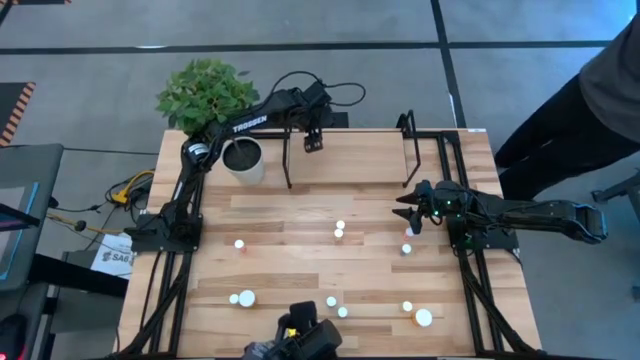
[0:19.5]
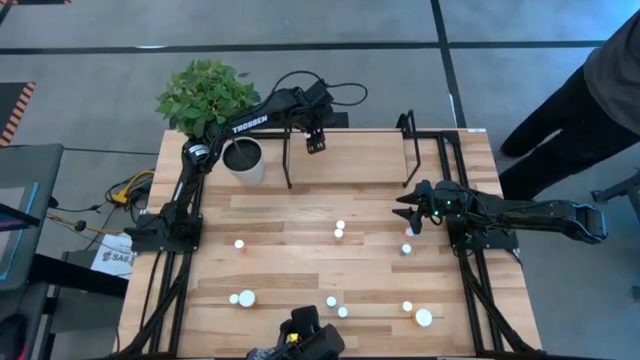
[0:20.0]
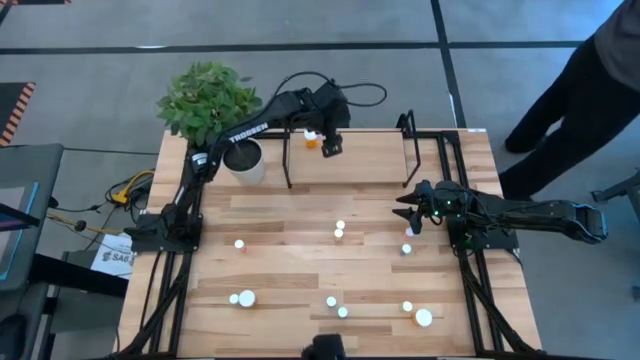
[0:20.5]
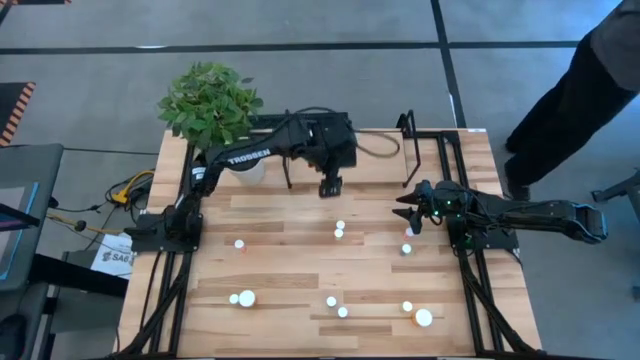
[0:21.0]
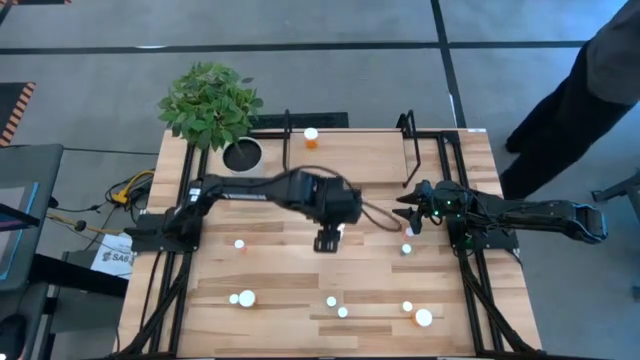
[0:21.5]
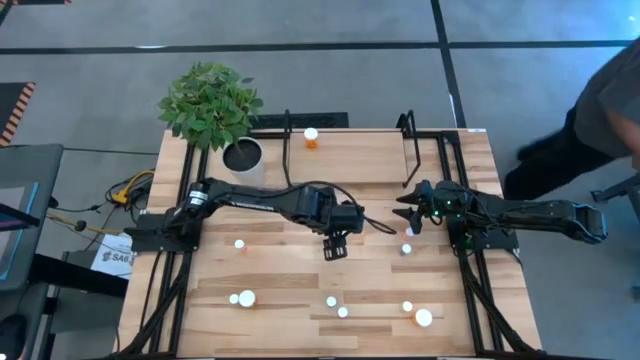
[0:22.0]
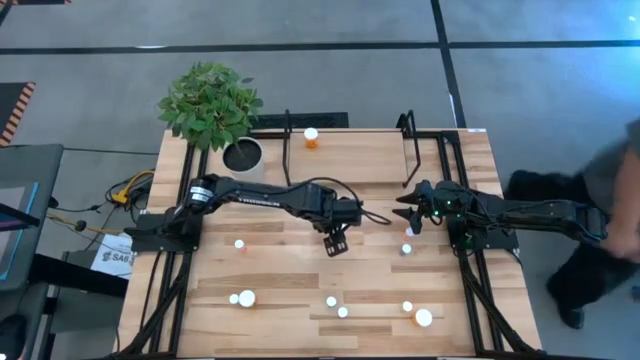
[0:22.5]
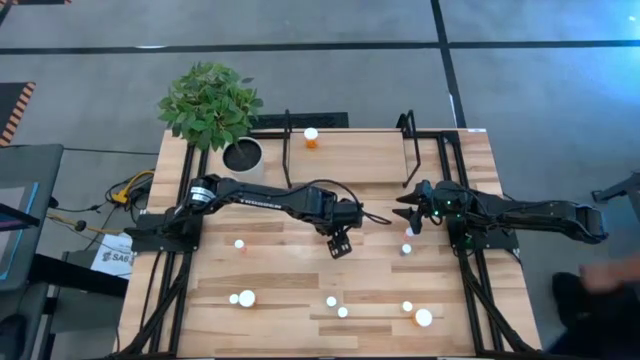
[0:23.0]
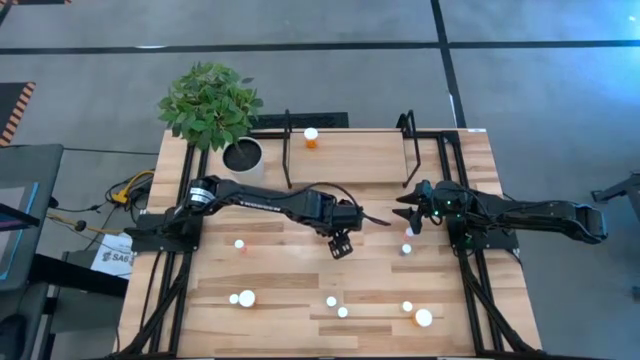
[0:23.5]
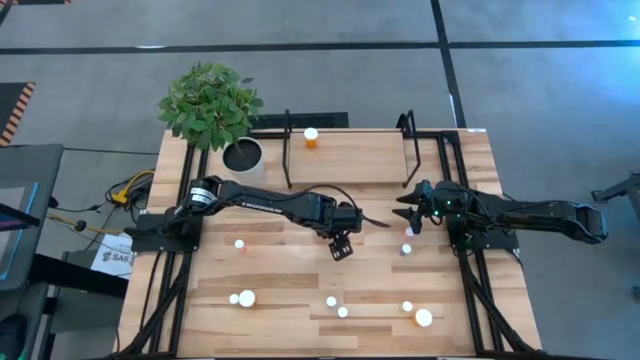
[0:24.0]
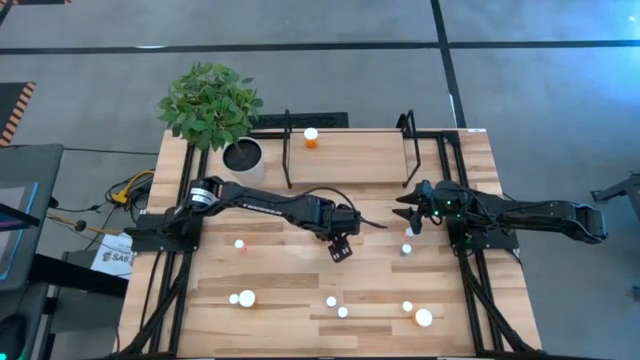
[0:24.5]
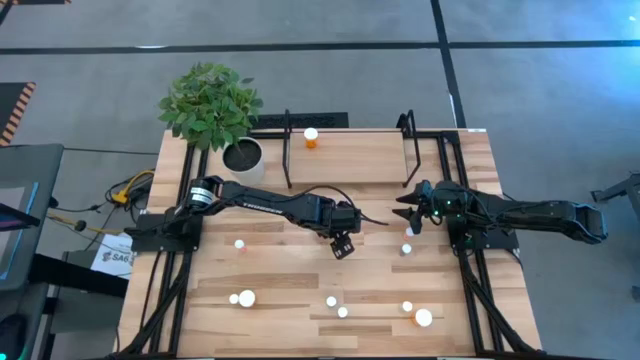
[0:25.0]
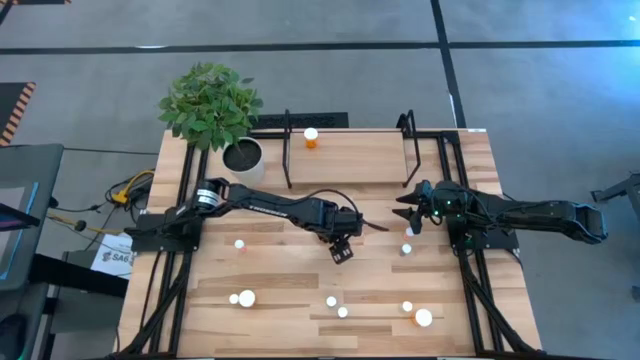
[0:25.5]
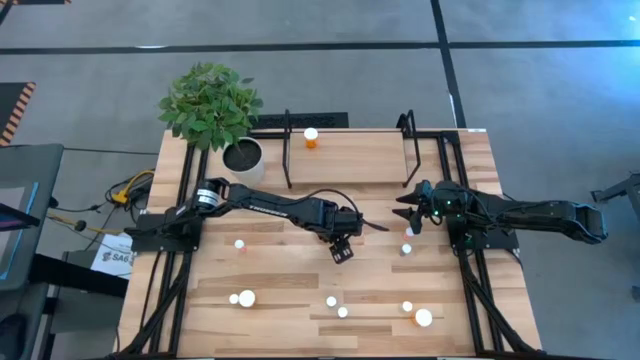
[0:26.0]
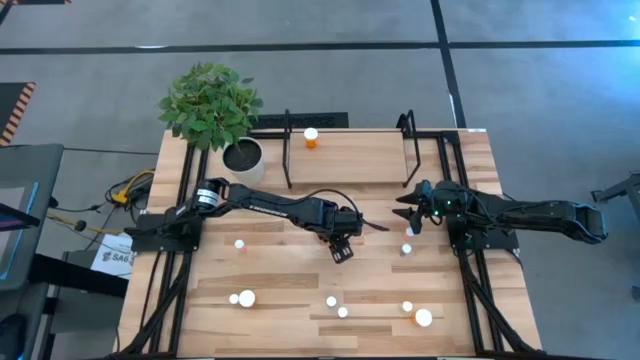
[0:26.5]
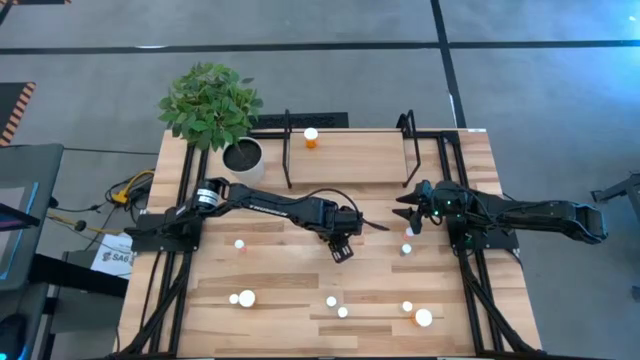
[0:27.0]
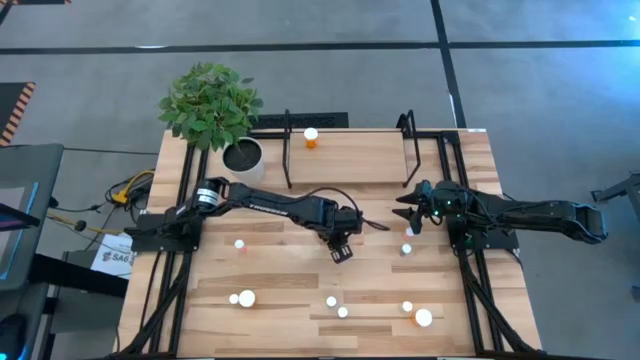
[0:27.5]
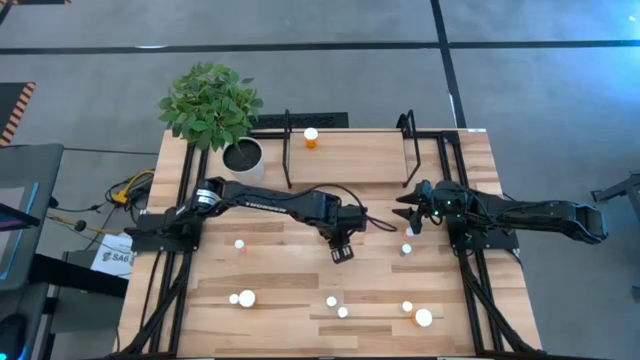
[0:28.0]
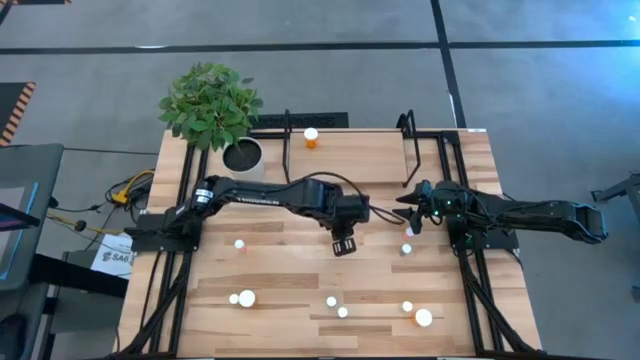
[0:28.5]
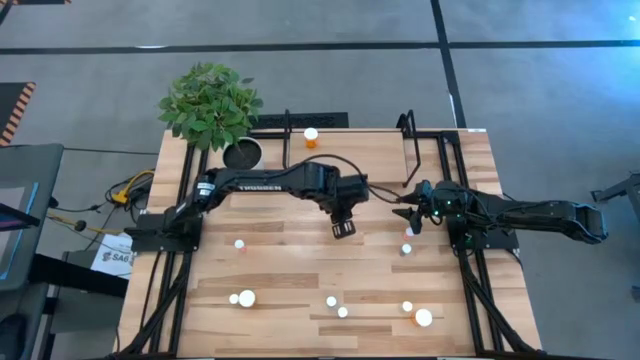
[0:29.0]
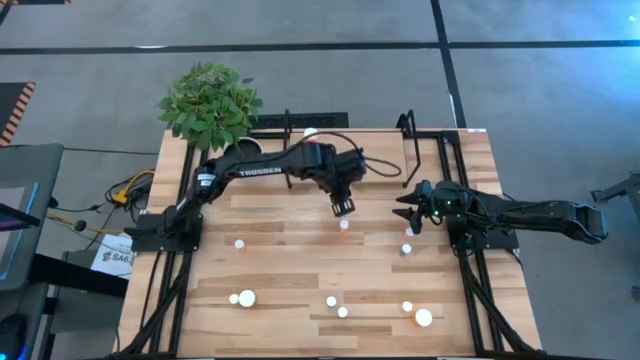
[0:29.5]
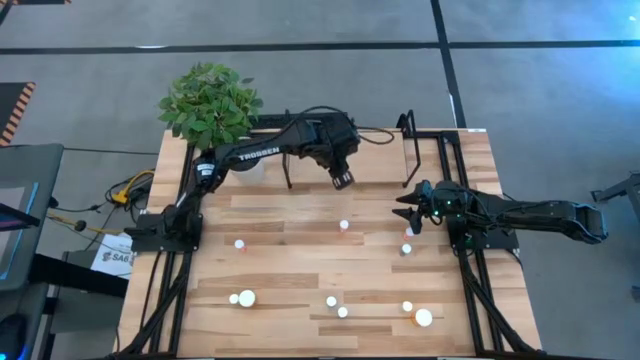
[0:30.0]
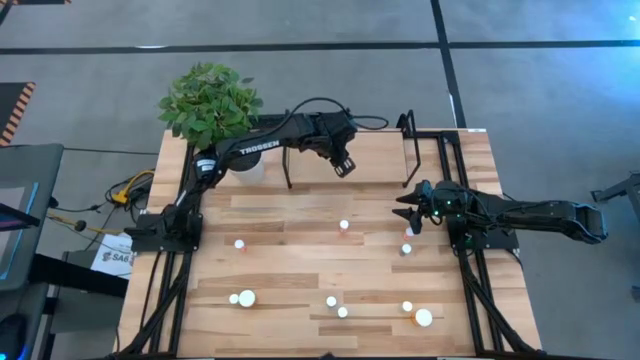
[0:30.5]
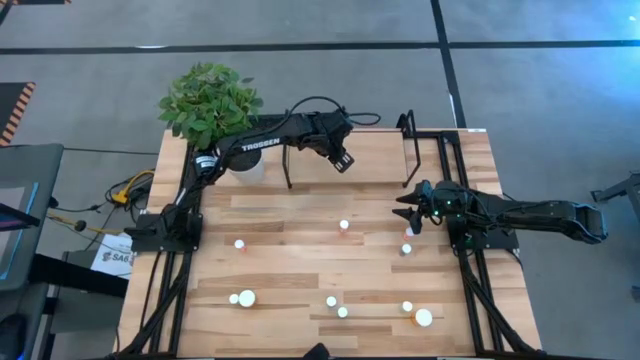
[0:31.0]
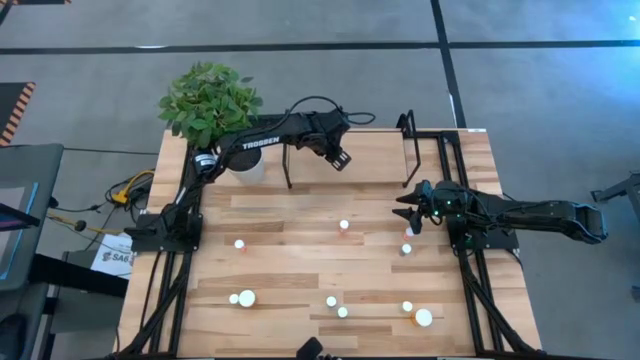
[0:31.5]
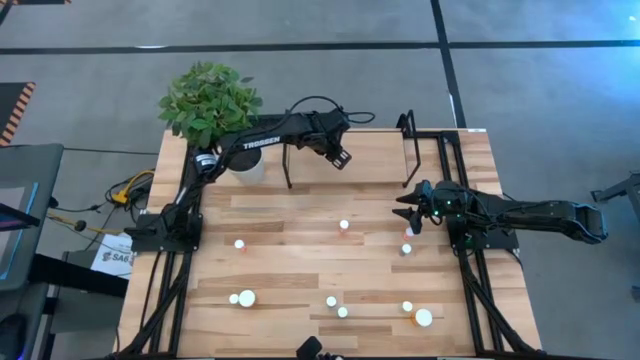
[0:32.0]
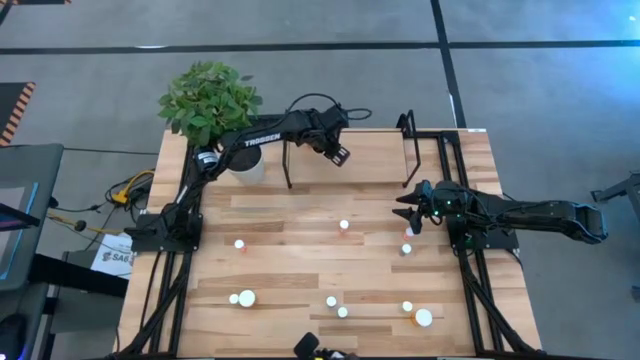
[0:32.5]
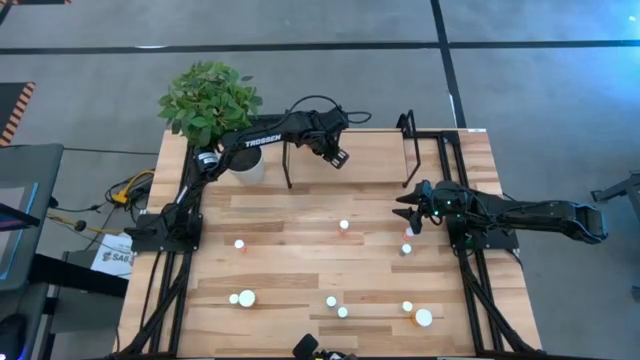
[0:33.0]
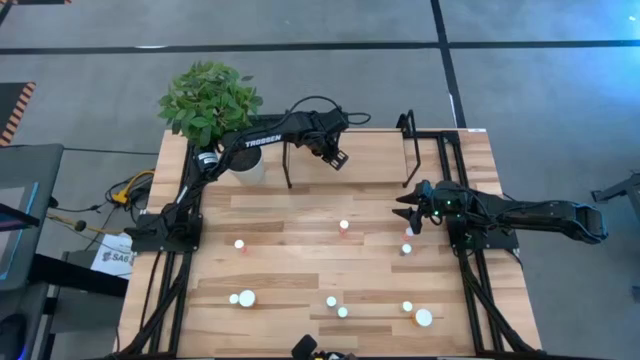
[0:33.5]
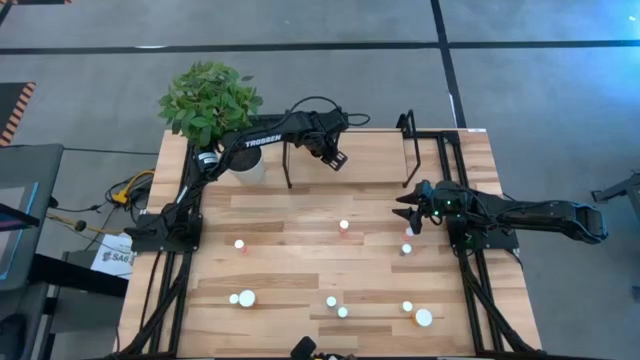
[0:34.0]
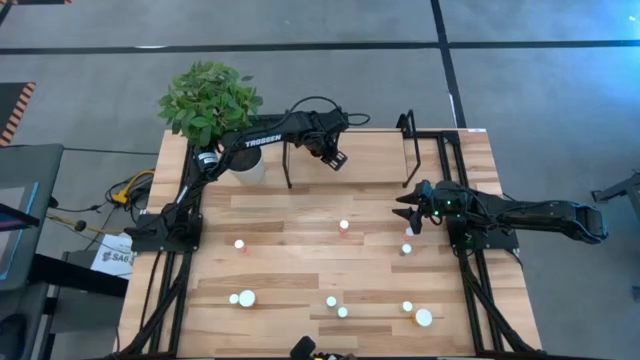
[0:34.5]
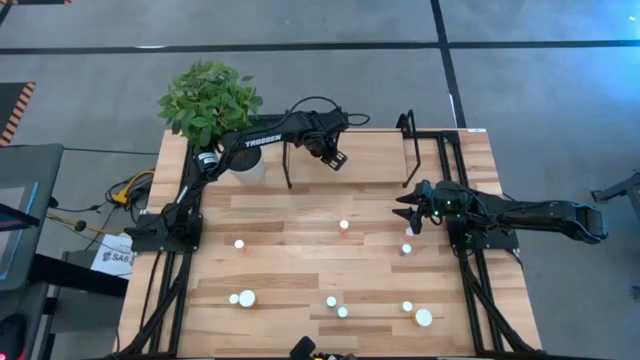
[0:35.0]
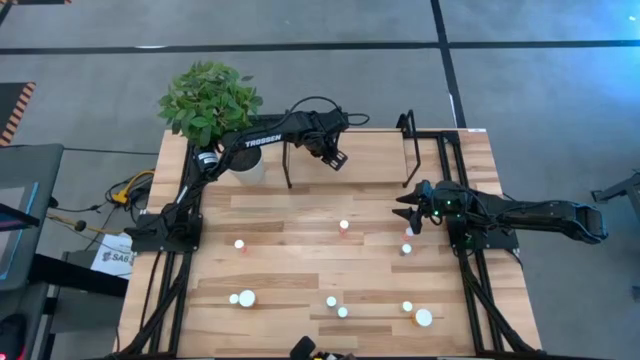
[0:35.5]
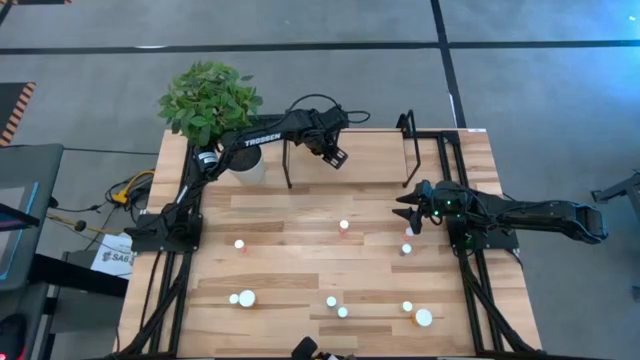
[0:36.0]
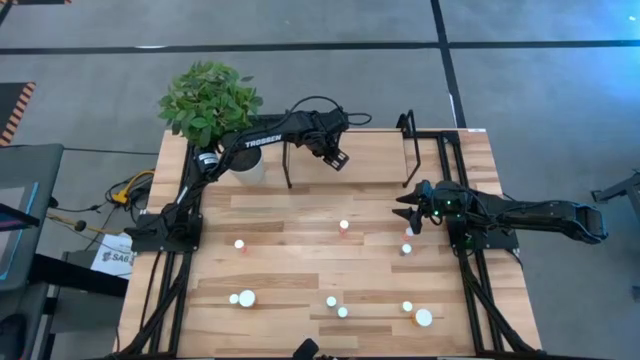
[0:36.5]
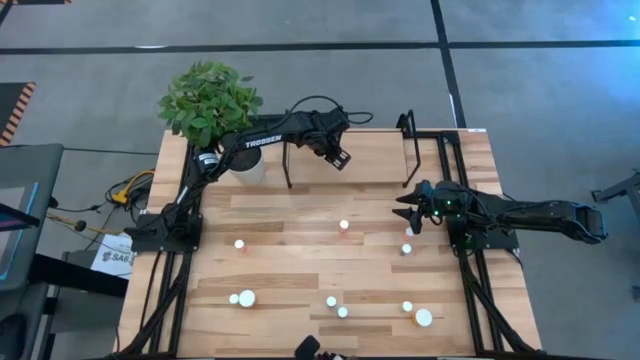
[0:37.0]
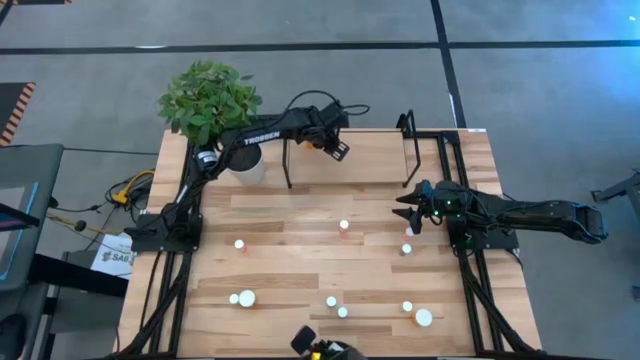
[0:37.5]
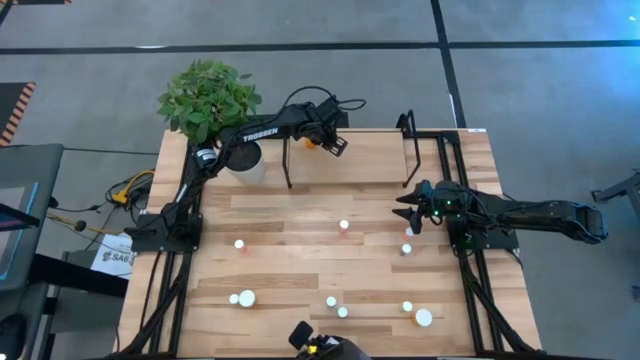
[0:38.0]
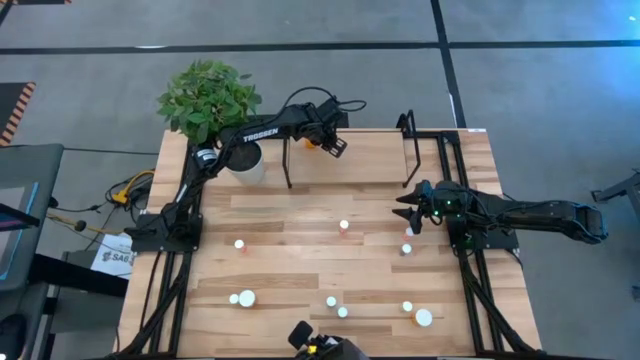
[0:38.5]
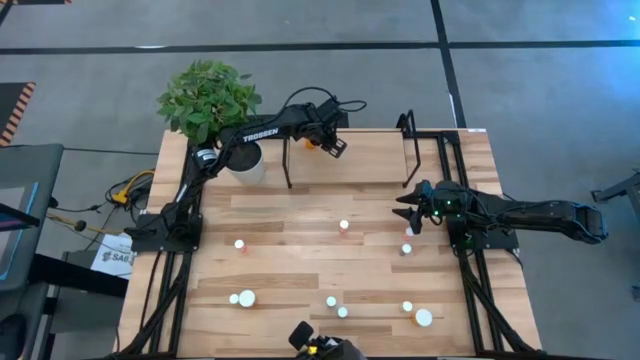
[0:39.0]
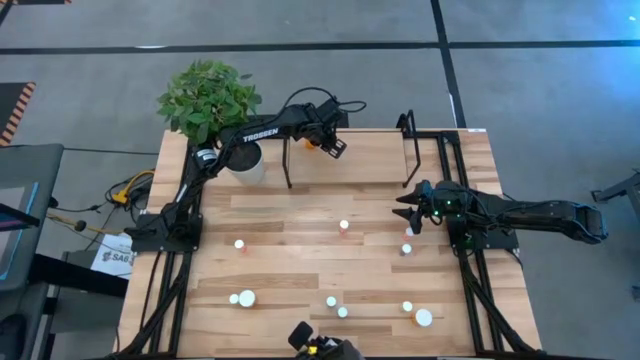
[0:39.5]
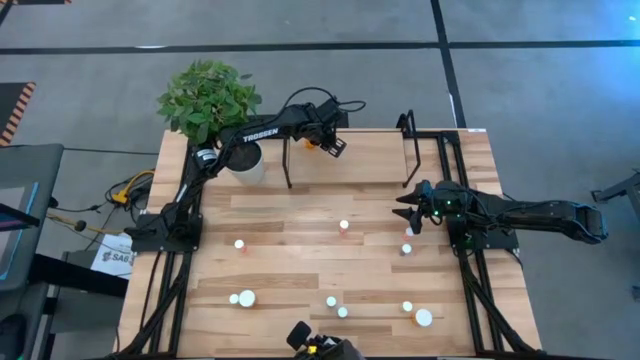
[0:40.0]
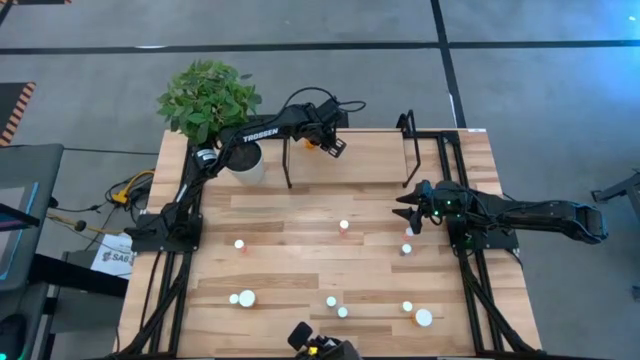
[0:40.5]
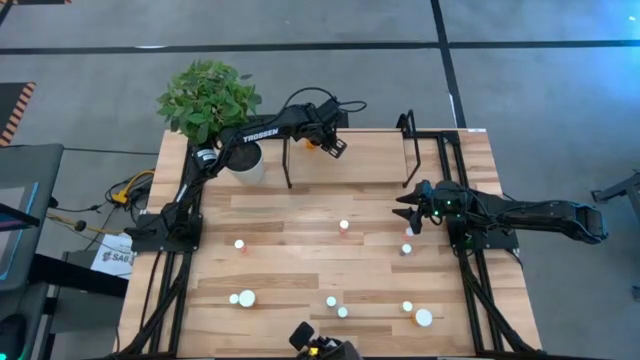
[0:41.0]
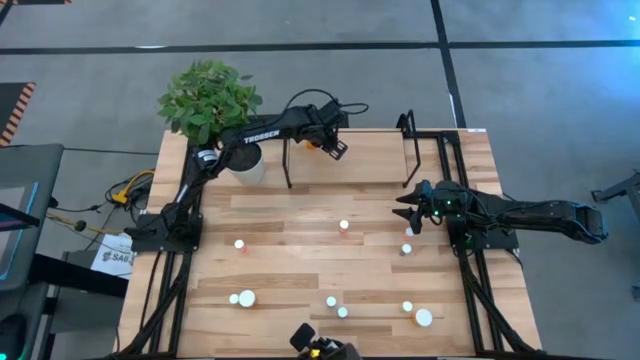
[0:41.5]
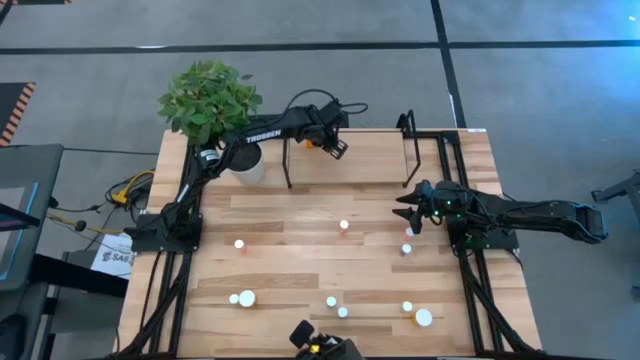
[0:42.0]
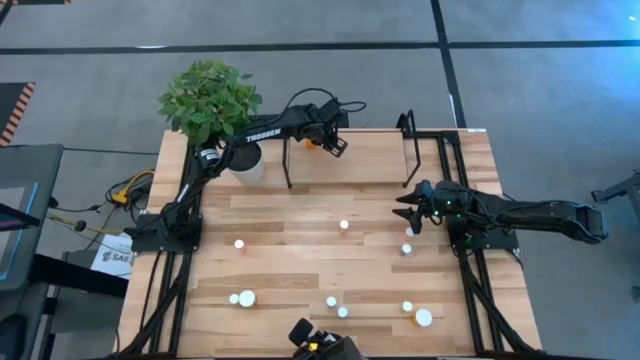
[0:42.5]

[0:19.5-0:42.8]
Task: Pick and place medicine bottles onto shelf by color
Put the top yellow pill bottle on the shelf
